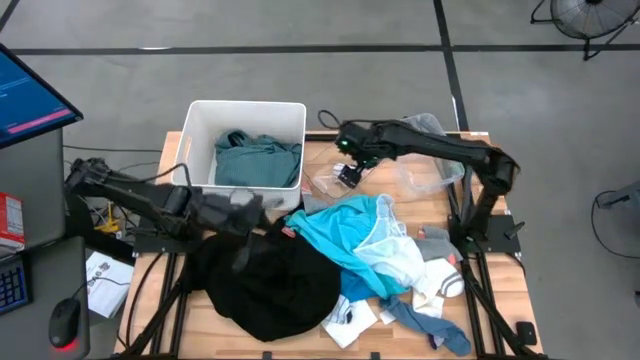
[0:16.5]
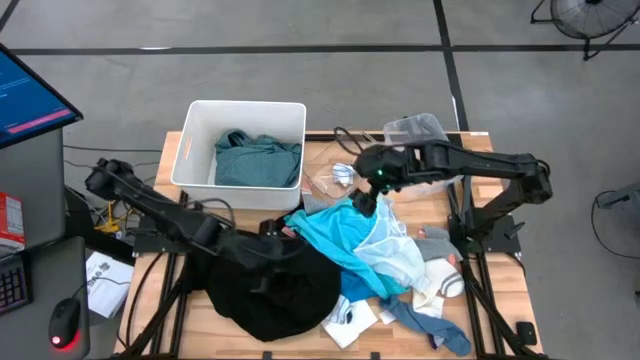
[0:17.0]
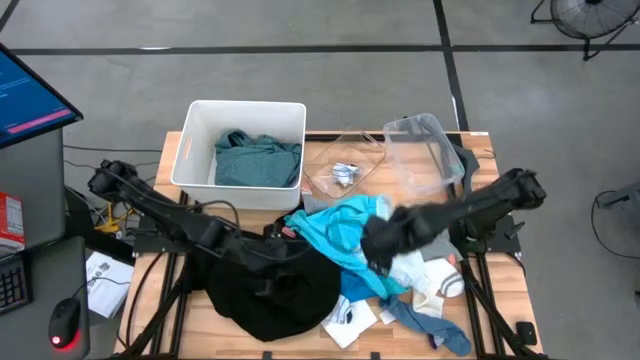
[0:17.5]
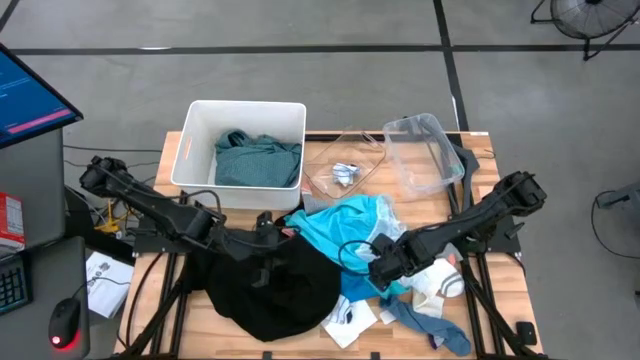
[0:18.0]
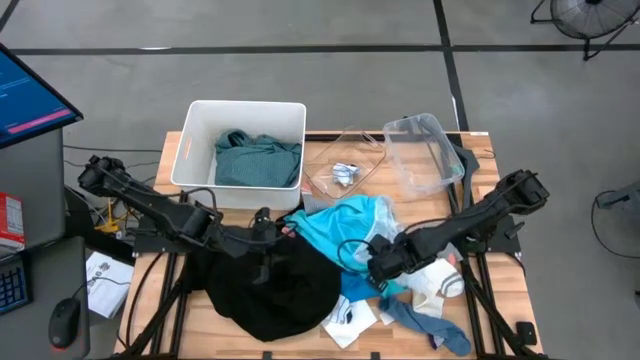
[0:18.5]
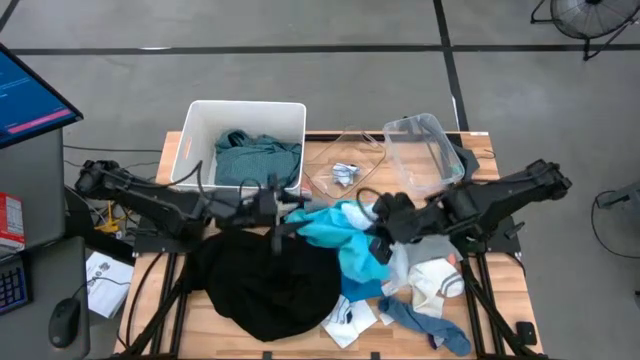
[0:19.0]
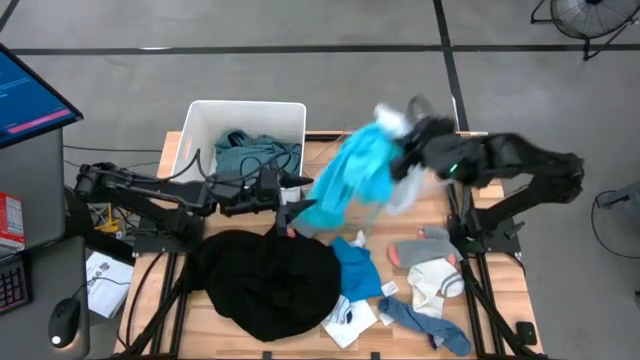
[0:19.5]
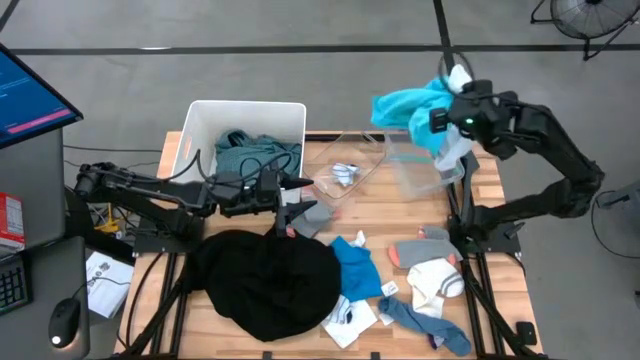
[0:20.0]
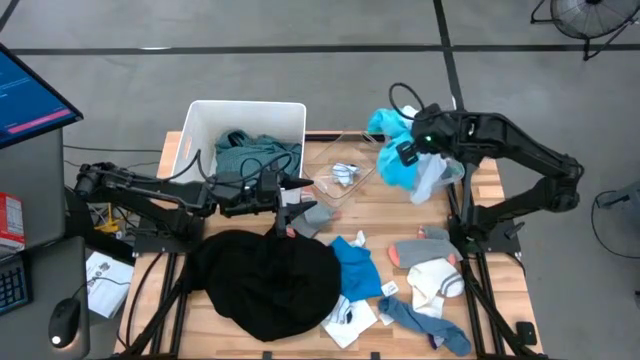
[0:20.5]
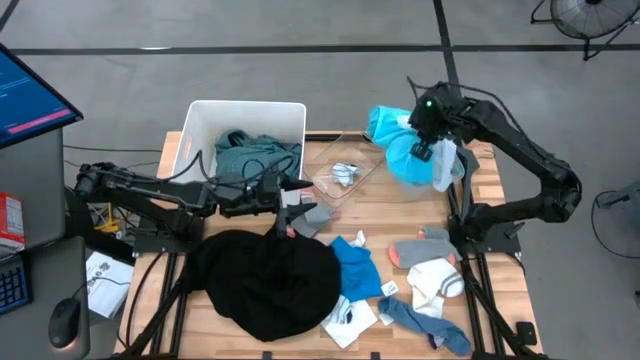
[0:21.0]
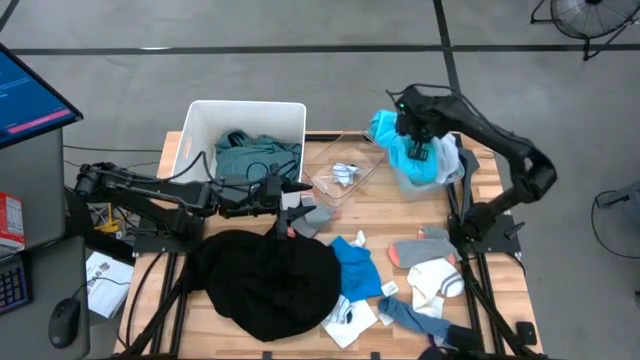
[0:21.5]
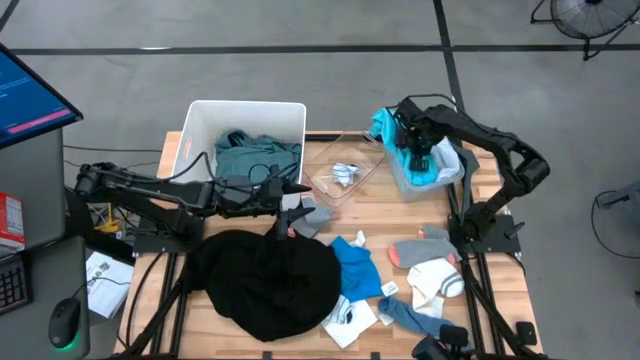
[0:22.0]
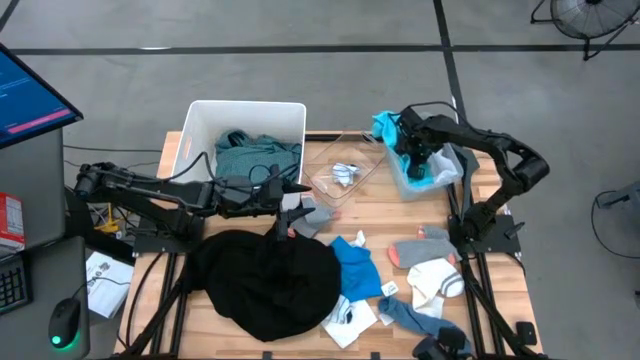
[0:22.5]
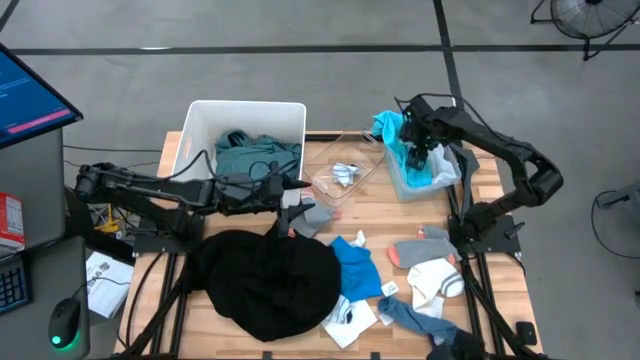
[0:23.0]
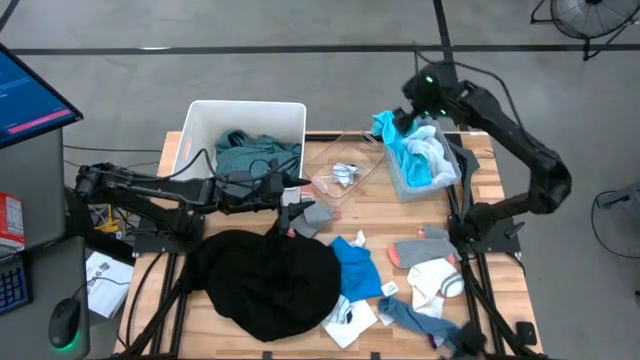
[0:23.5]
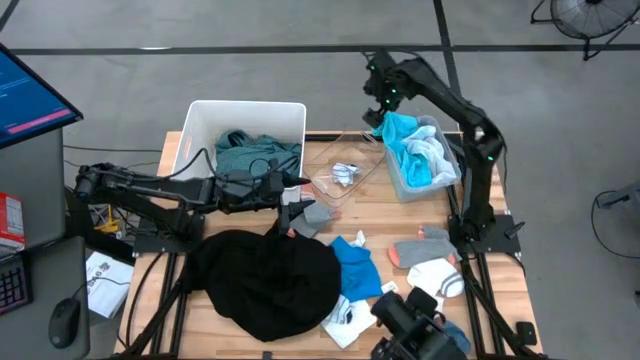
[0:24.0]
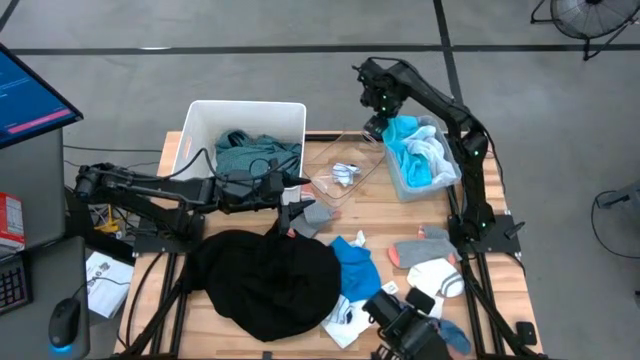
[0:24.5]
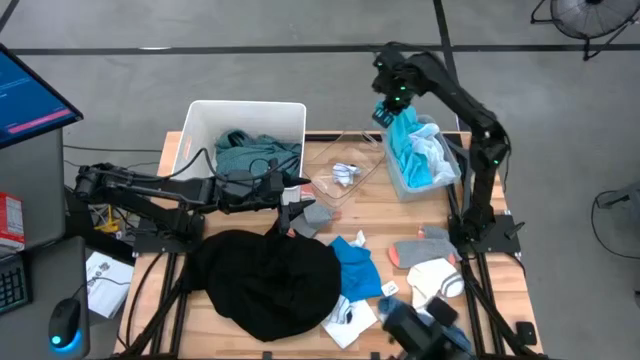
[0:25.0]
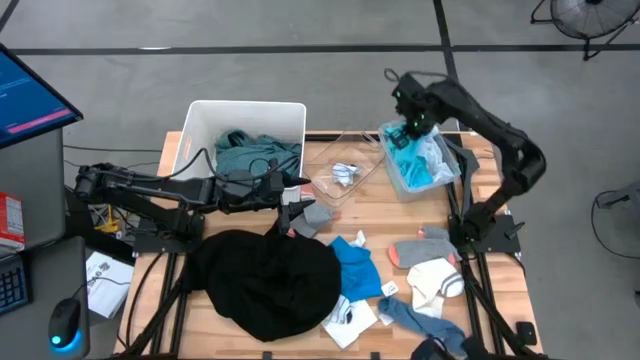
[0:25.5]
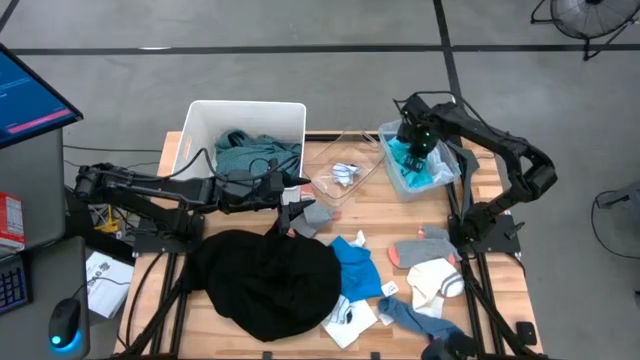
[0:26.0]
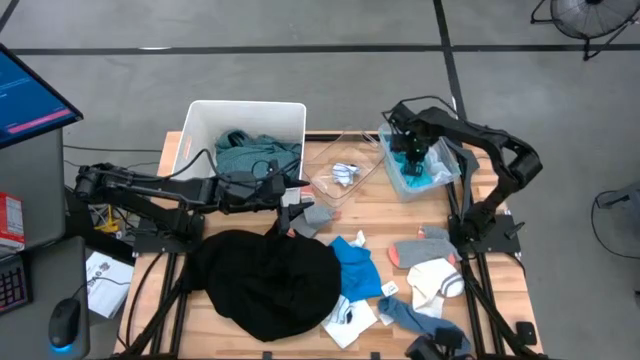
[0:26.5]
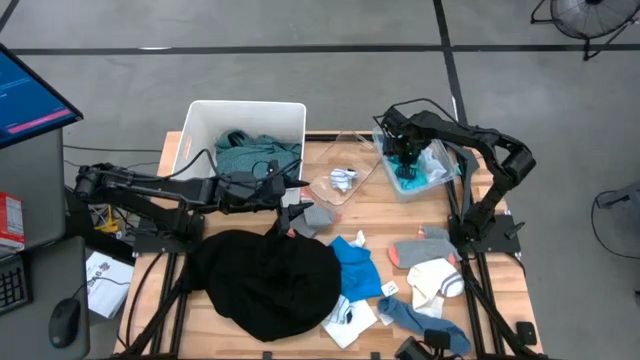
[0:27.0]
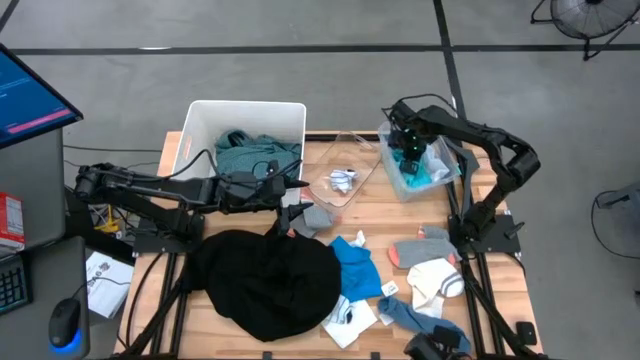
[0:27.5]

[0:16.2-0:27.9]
Task: Pick & Place Cloths
Put the light blue pants into the right transparent bin

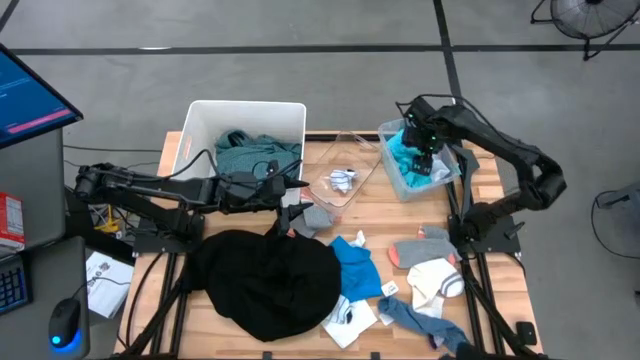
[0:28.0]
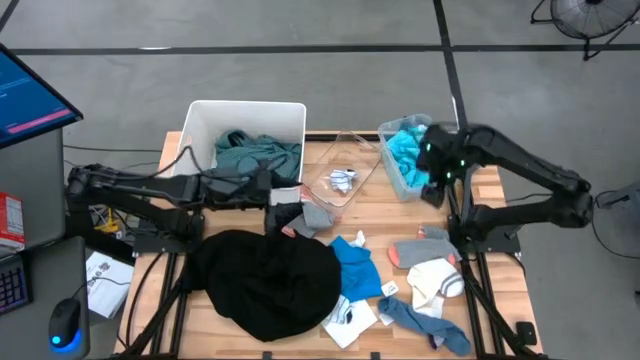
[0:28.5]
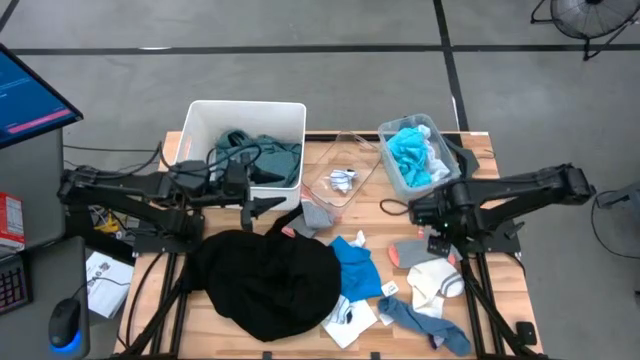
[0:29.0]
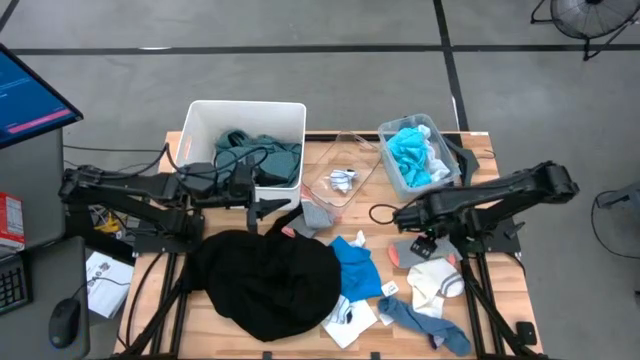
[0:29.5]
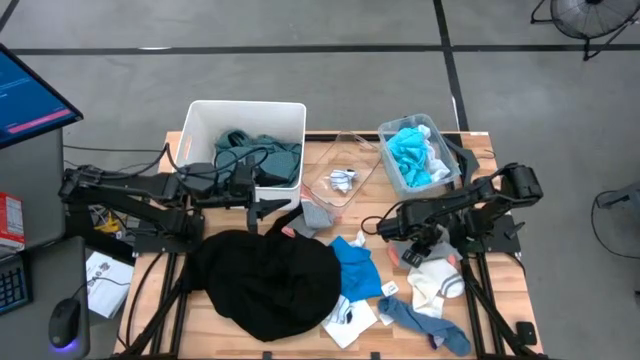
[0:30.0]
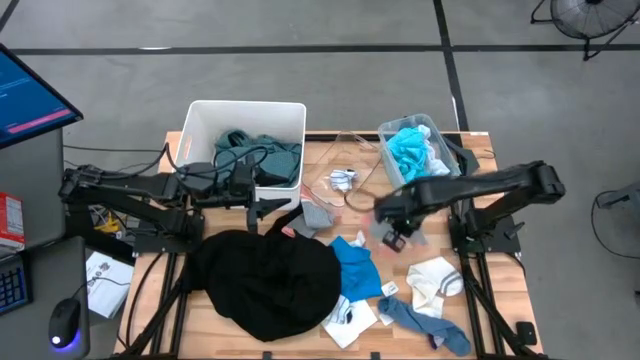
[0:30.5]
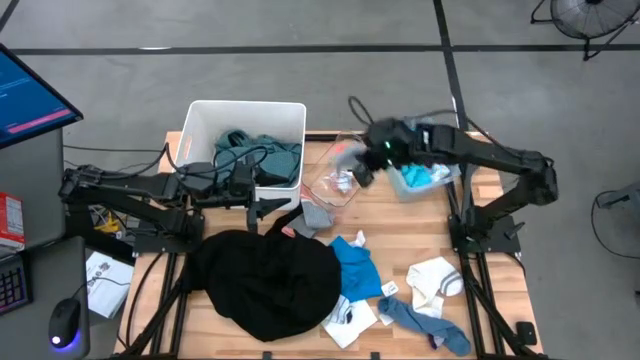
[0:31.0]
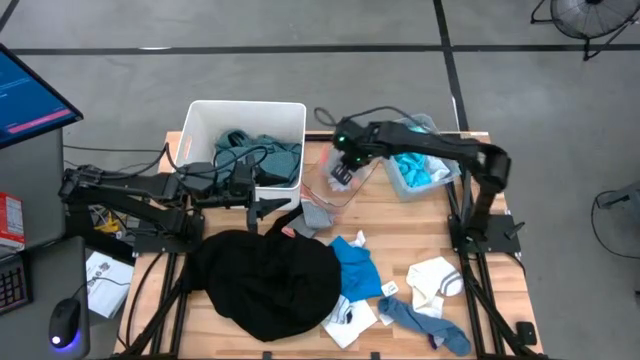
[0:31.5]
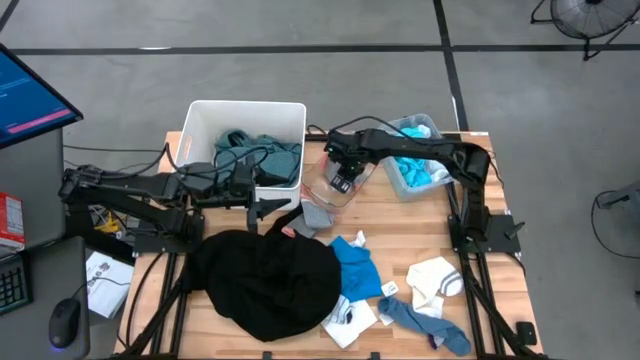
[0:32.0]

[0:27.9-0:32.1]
Put the gray sock into the middle transparent bin

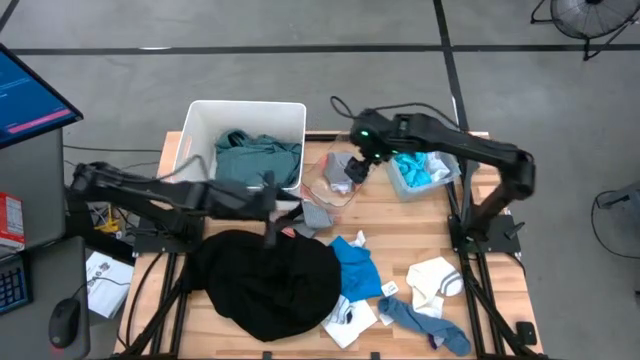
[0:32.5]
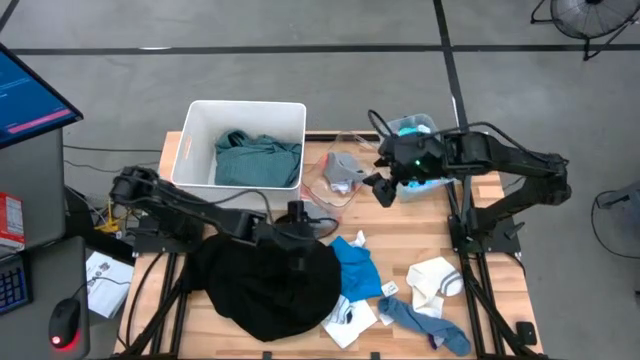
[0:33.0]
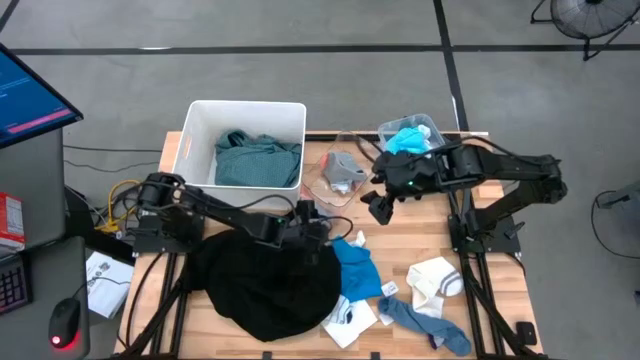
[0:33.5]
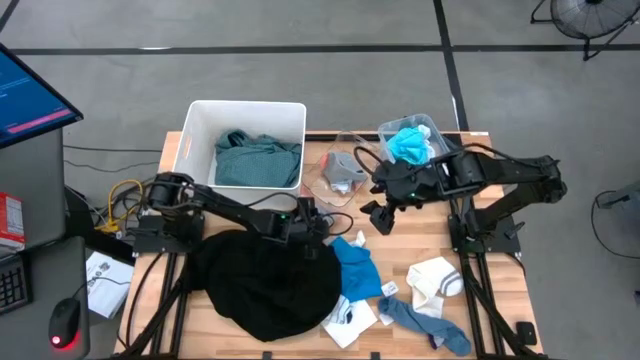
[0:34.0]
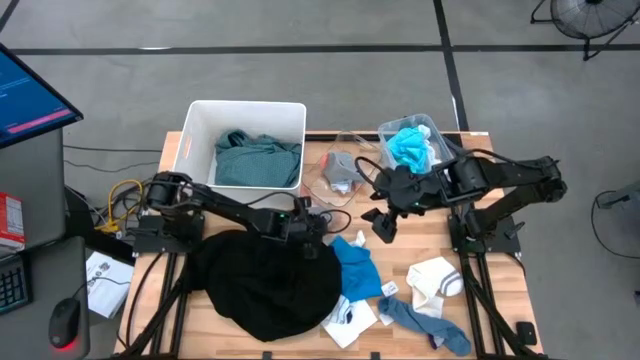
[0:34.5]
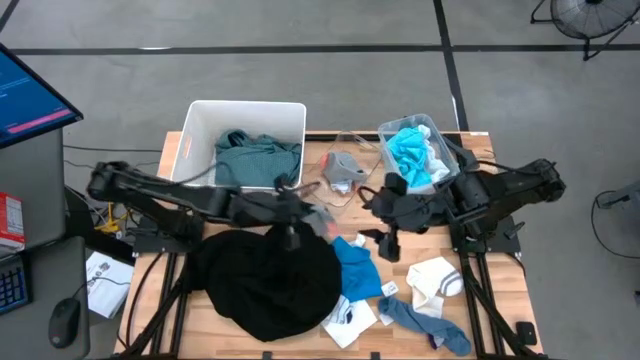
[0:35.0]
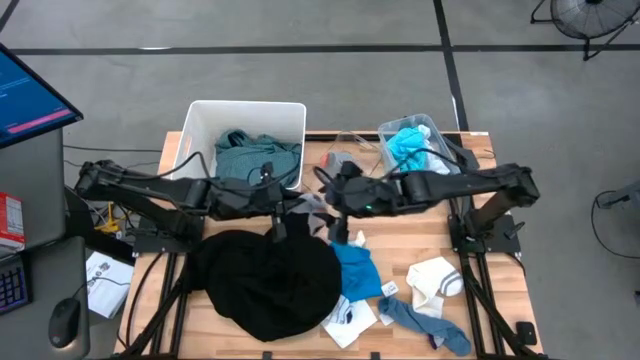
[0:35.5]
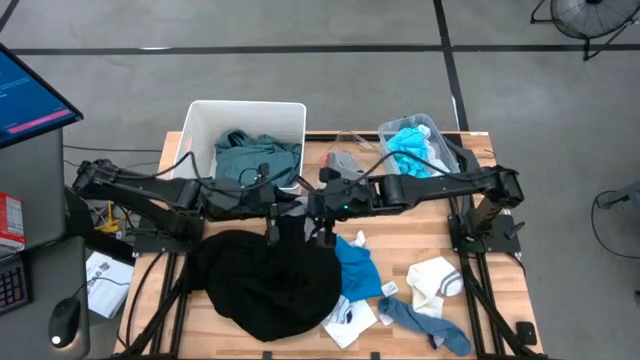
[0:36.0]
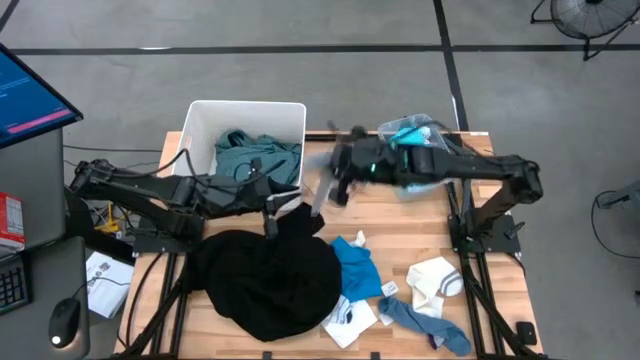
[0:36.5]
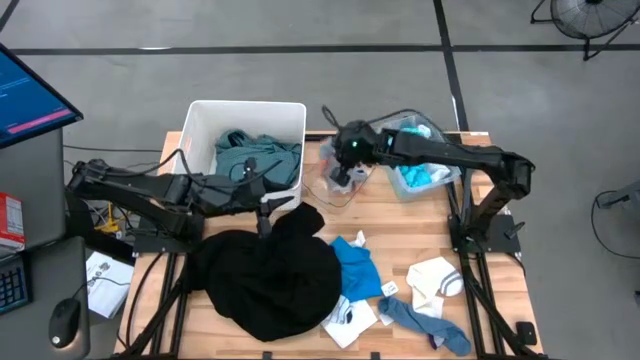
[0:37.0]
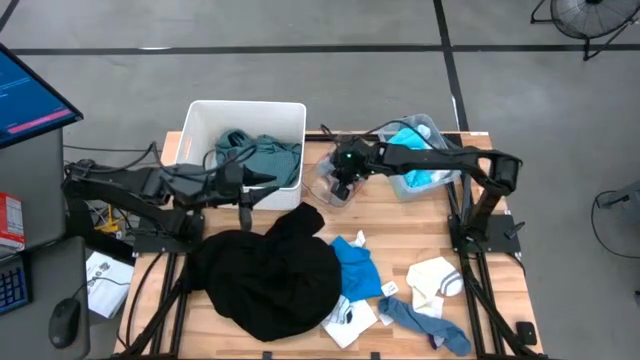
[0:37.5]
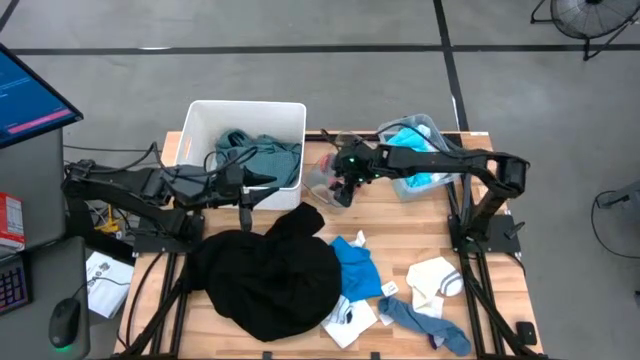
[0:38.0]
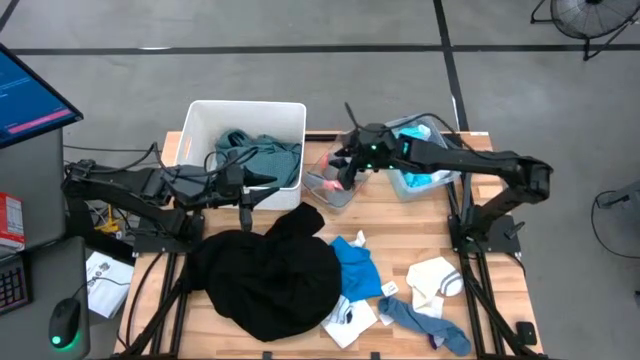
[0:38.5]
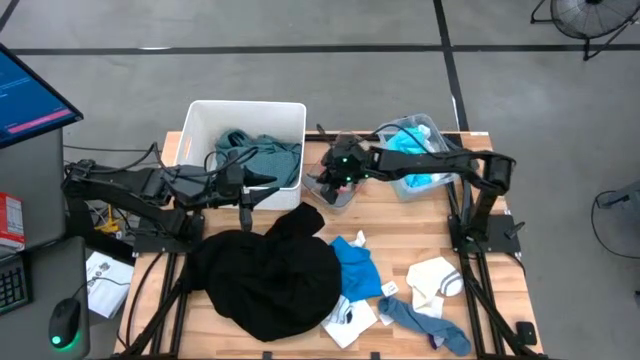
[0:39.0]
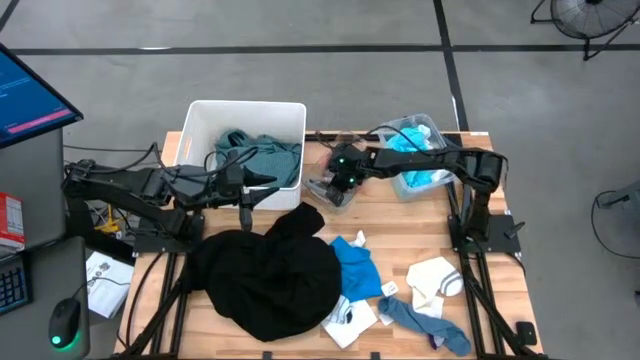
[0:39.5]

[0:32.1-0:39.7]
Put the gray sock into the middle transparent bin
